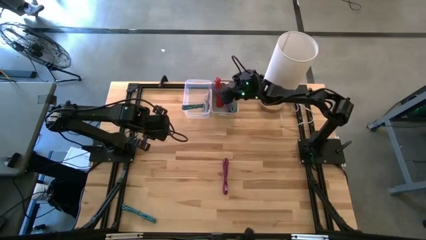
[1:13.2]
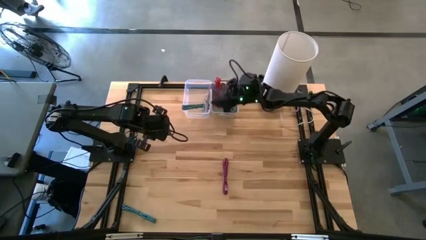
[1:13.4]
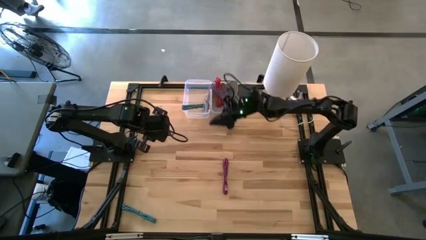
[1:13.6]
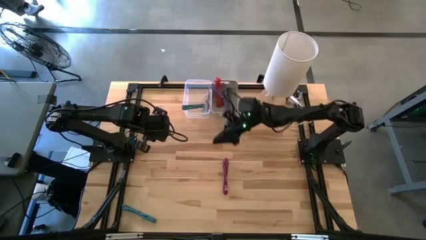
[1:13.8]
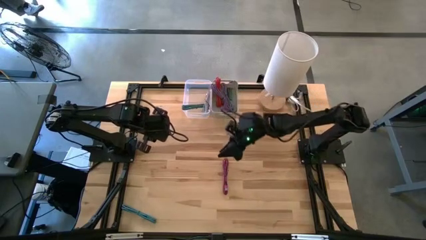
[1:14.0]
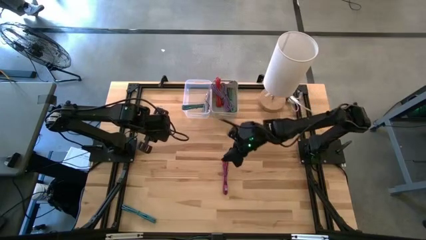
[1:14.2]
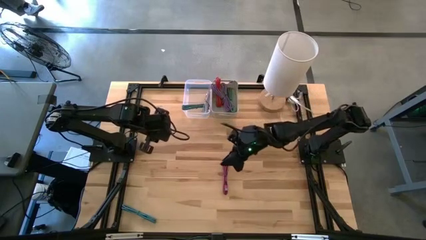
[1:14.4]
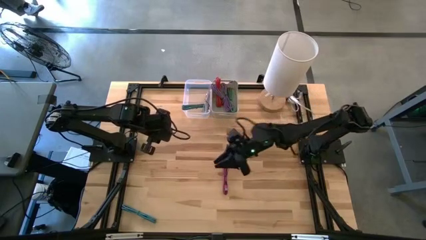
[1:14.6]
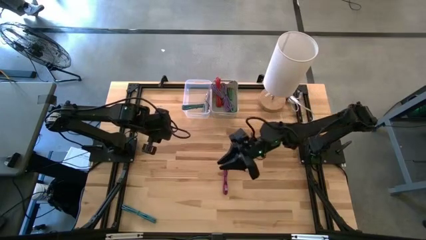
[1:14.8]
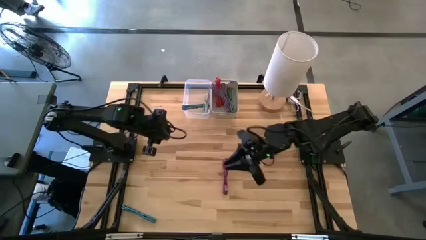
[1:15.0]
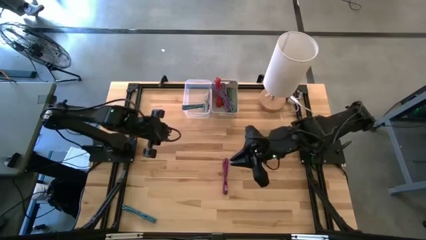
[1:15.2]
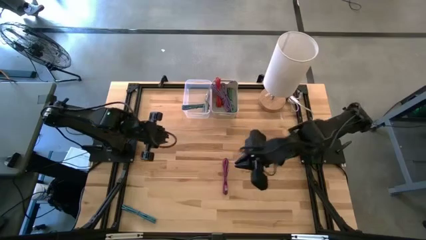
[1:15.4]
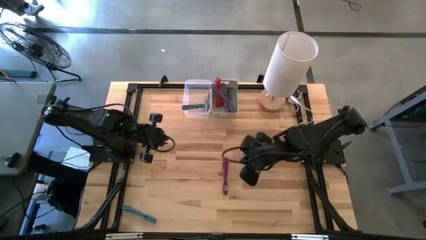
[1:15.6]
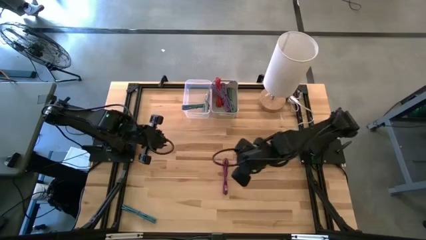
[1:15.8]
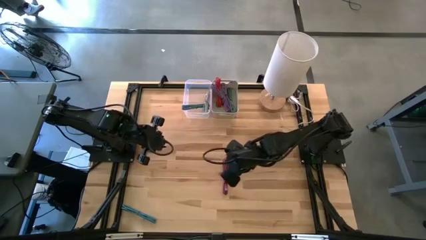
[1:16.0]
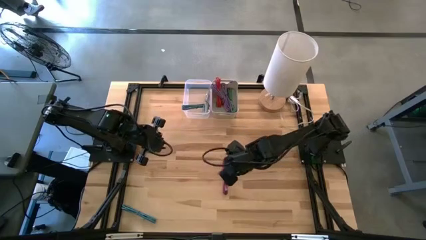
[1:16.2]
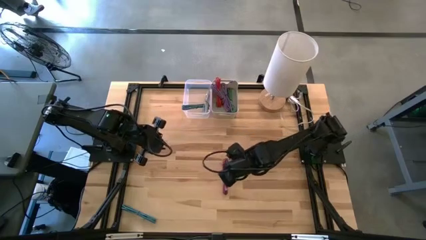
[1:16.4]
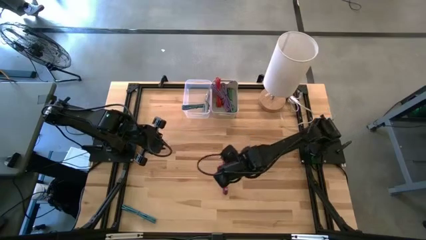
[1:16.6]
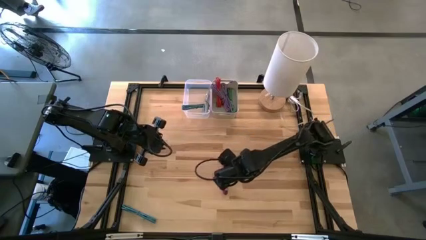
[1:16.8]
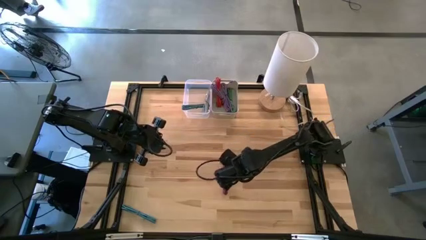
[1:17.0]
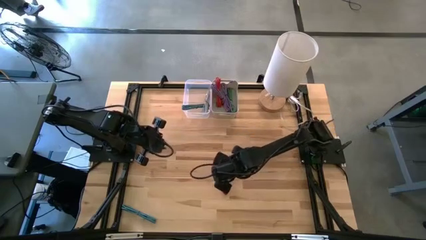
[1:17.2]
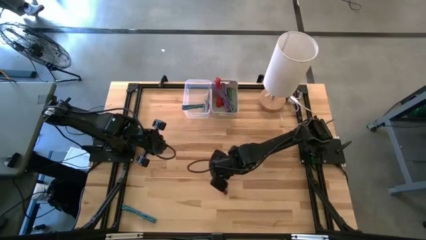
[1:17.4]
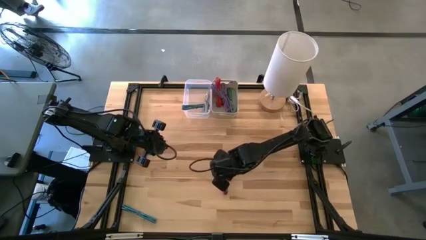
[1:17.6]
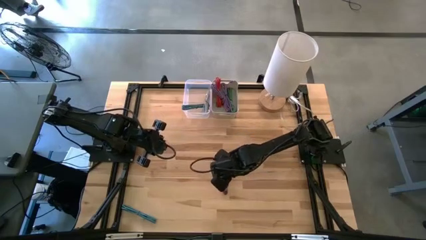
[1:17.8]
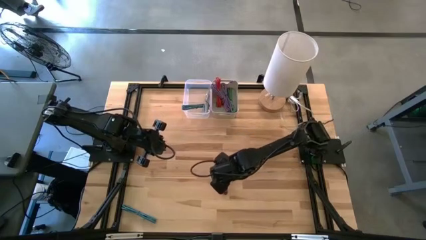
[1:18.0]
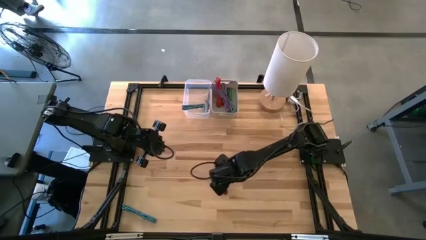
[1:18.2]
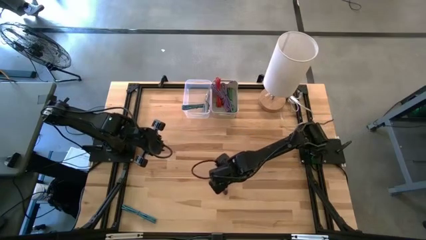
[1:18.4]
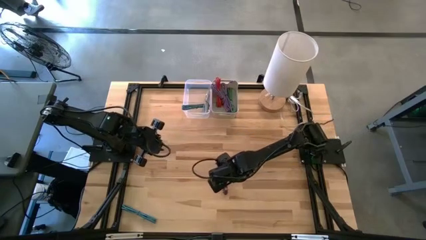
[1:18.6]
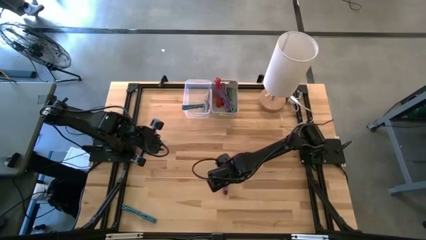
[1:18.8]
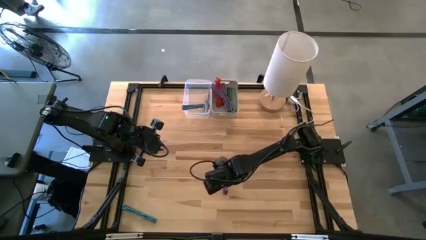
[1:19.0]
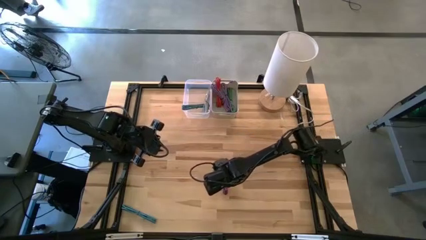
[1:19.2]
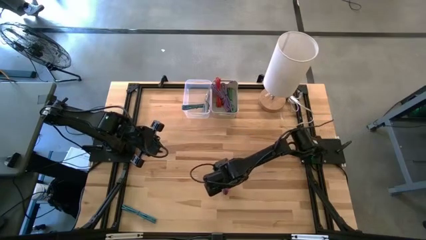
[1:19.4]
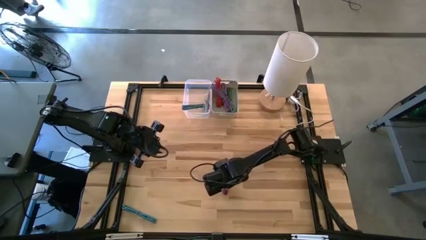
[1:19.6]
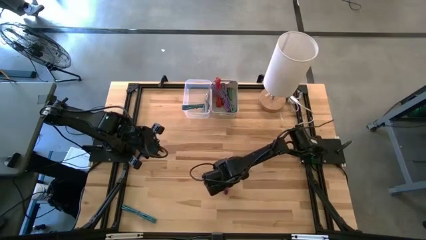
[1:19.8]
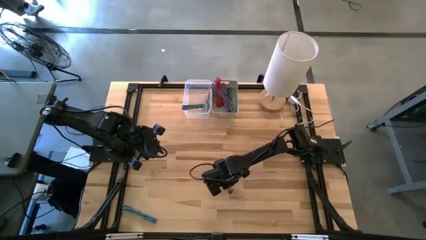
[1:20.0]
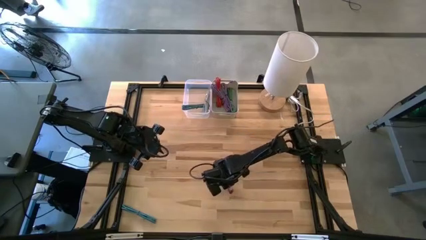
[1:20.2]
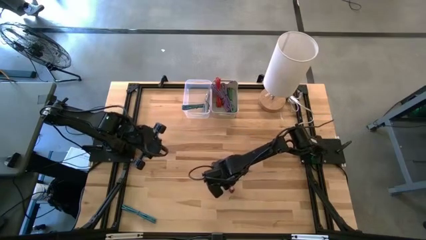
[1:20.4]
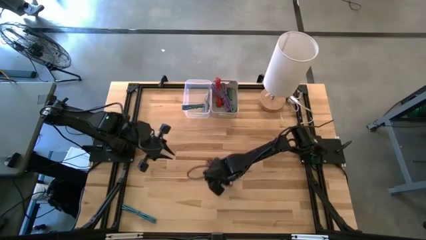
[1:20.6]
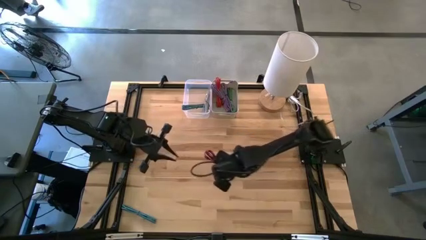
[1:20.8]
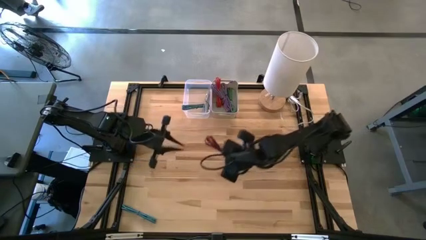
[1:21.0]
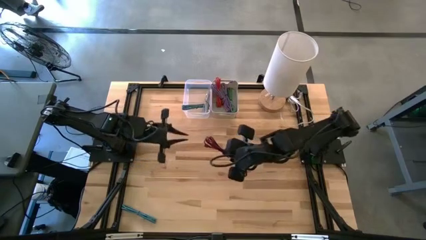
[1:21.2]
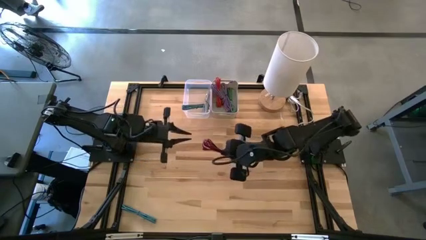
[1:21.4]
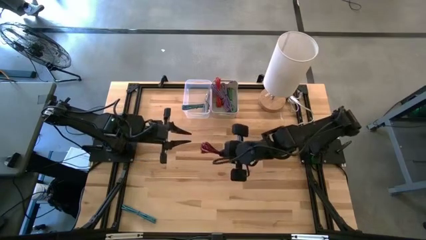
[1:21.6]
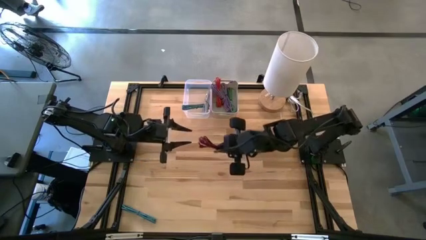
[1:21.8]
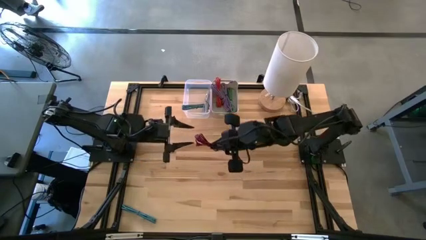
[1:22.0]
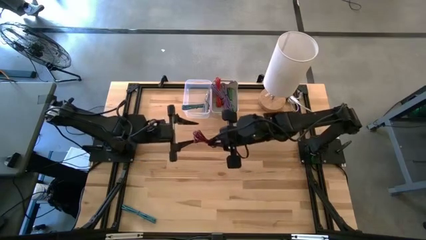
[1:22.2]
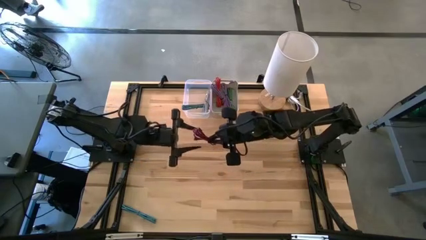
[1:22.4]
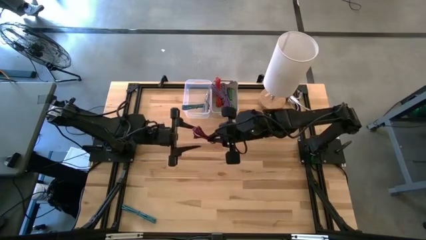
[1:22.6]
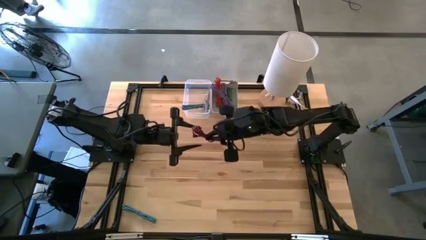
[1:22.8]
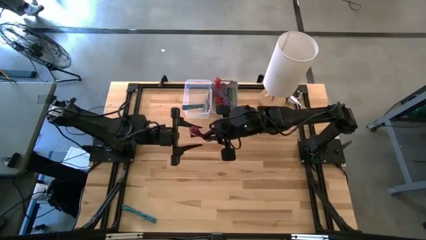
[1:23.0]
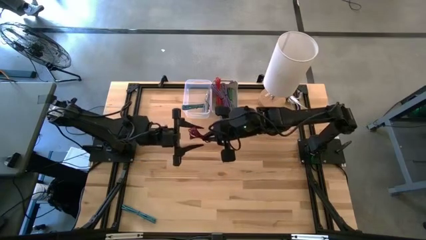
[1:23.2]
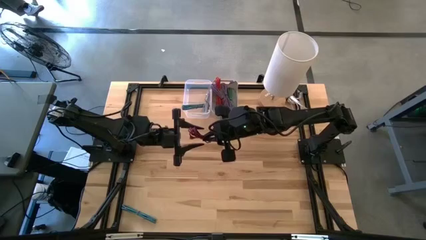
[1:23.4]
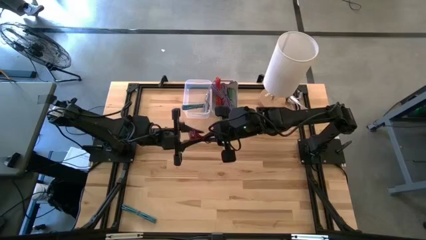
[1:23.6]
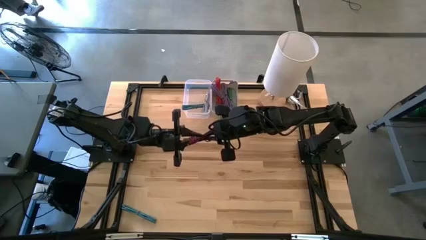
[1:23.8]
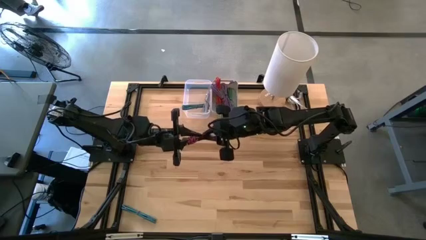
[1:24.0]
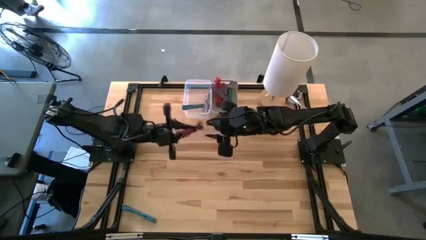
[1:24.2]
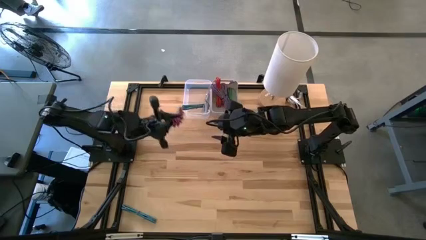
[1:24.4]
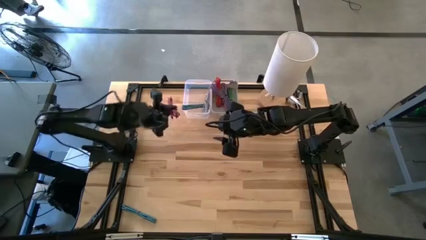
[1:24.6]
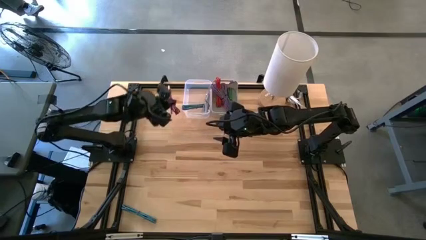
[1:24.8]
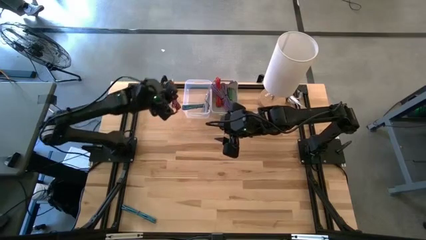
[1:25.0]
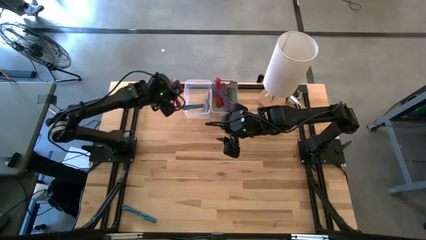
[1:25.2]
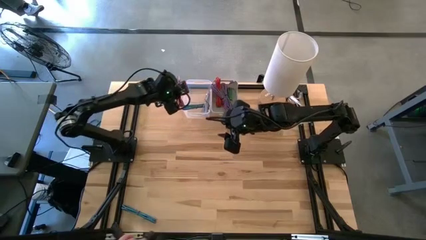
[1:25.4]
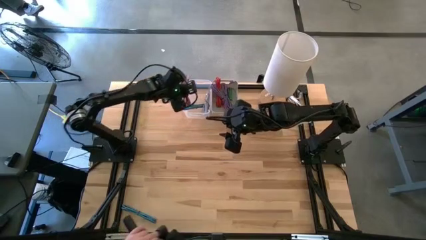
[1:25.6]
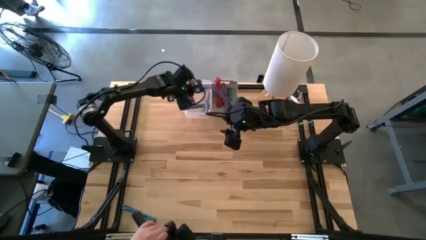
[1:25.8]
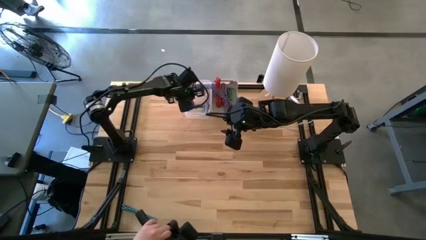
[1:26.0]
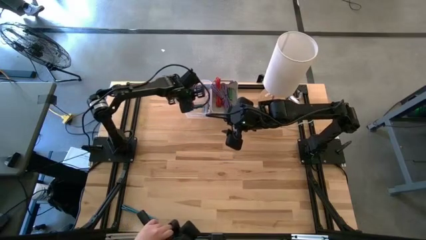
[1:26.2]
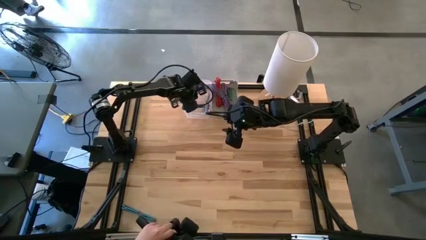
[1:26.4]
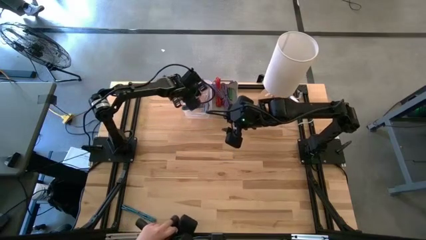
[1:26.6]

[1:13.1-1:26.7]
Task: Pick & Place USB Port
Put the pink and black charger cable into the transparent bin

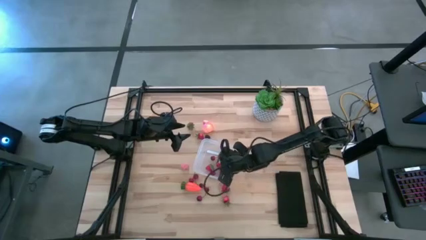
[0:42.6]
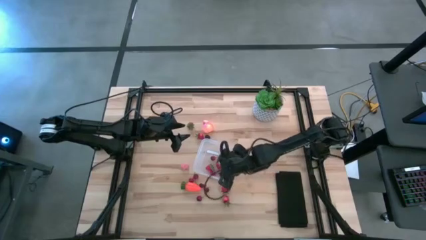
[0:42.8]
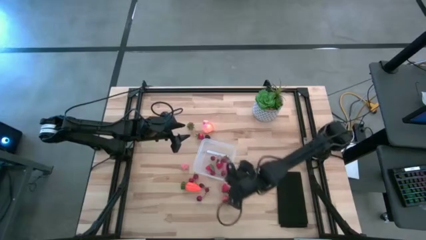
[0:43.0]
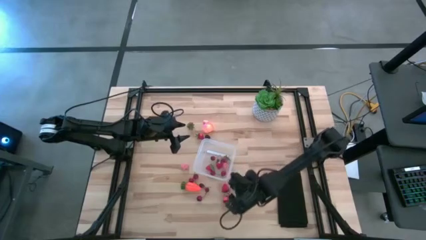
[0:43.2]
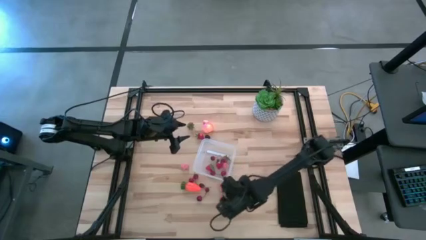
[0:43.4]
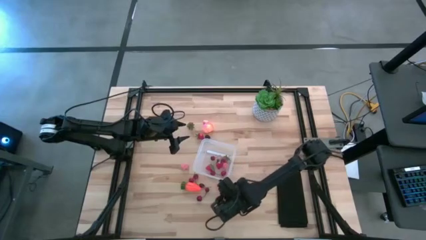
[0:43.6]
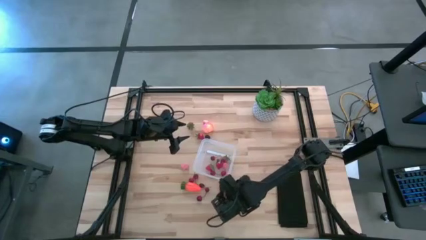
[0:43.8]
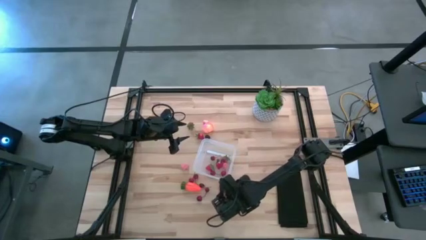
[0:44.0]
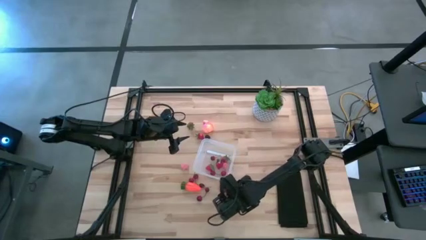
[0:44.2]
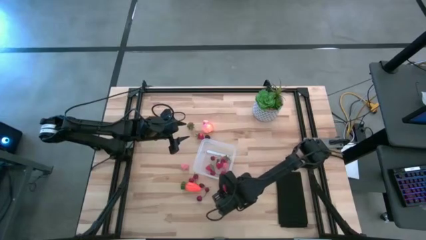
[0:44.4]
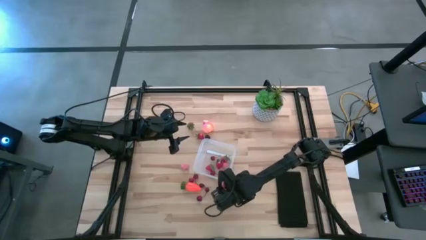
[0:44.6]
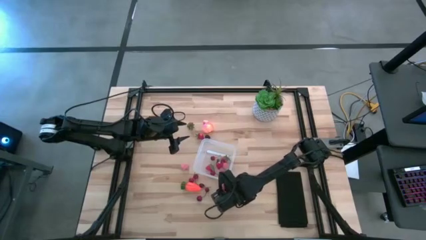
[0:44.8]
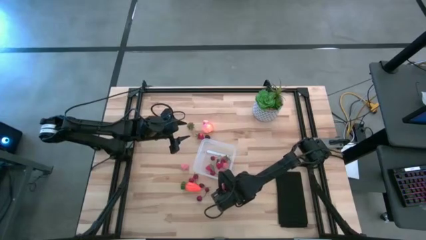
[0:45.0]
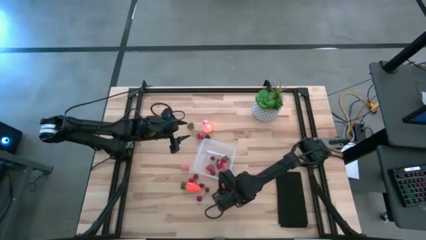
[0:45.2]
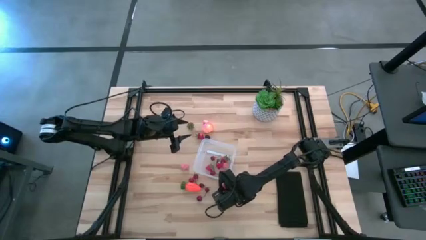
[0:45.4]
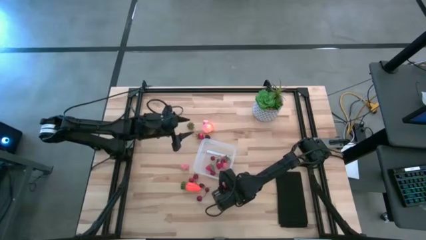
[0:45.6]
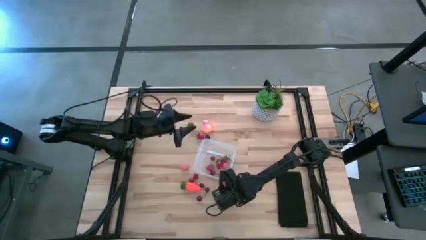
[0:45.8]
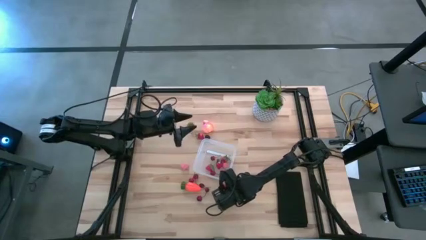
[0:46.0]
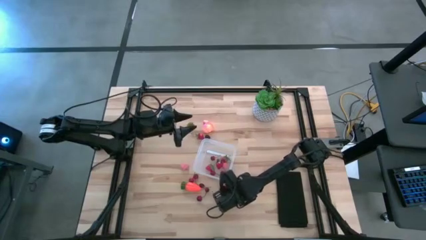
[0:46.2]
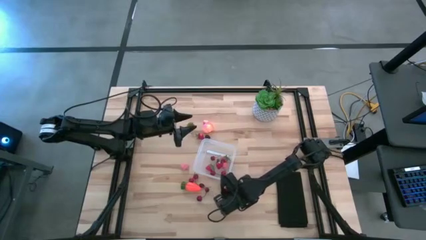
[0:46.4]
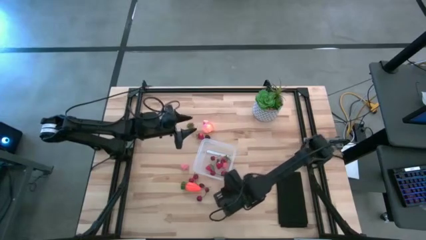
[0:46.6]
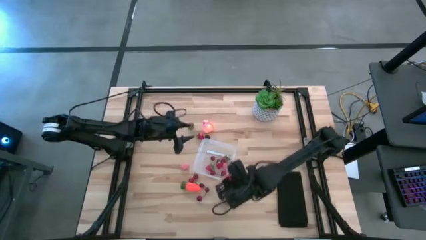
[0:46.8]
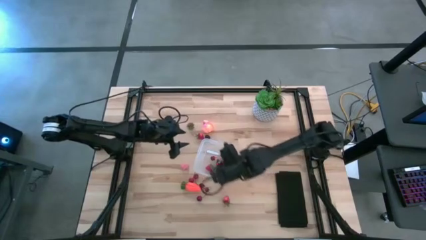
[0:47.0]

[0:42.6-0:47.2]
Task: Pick and placing Produce into tupperware
Put the red strawberry into the transparent container
